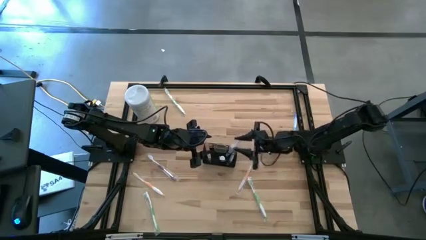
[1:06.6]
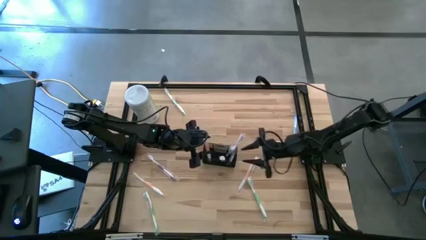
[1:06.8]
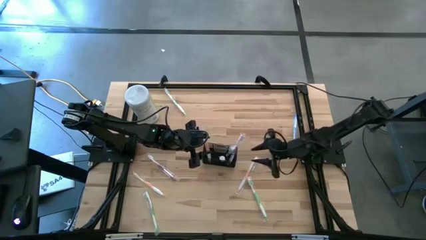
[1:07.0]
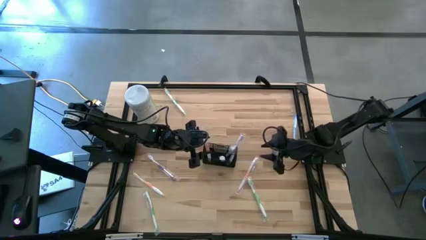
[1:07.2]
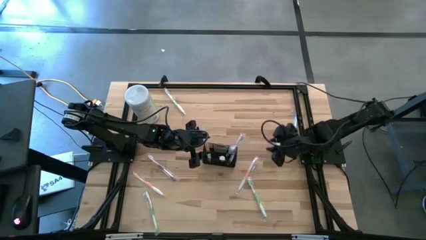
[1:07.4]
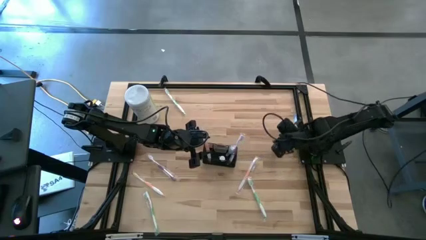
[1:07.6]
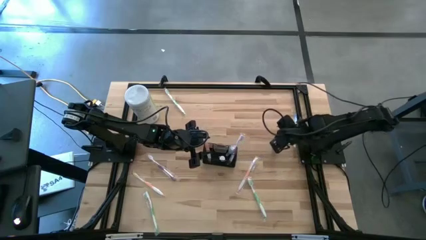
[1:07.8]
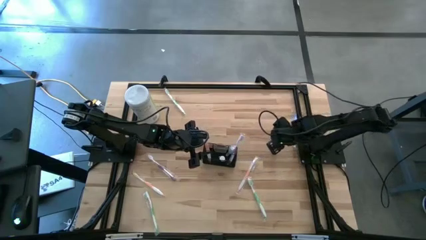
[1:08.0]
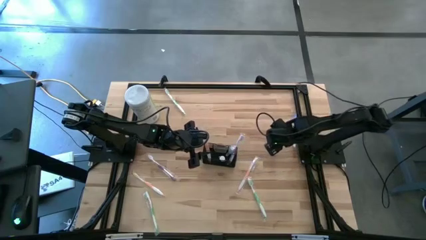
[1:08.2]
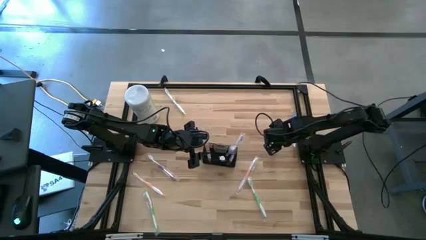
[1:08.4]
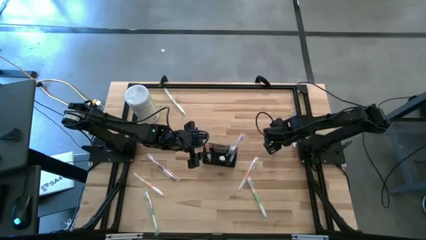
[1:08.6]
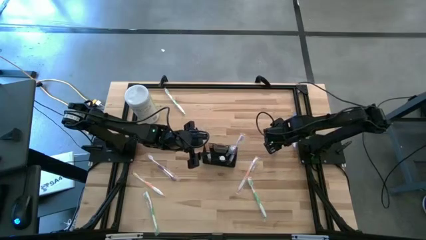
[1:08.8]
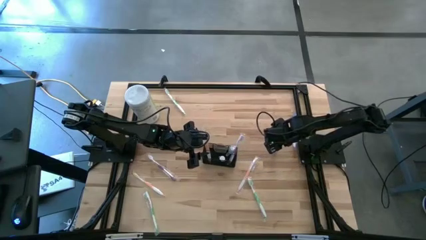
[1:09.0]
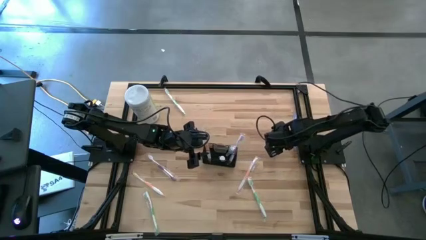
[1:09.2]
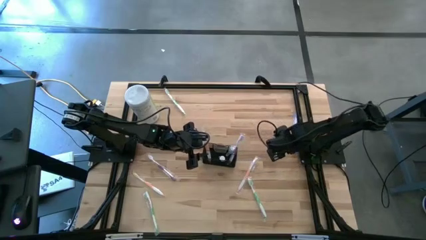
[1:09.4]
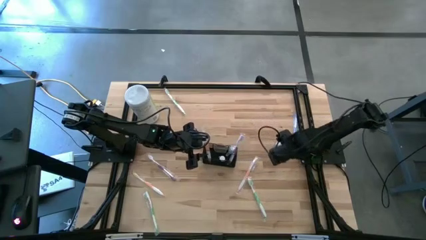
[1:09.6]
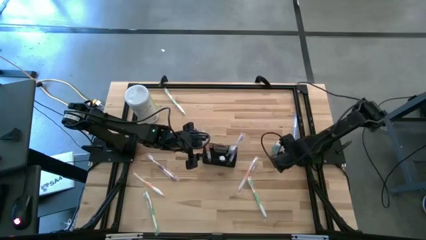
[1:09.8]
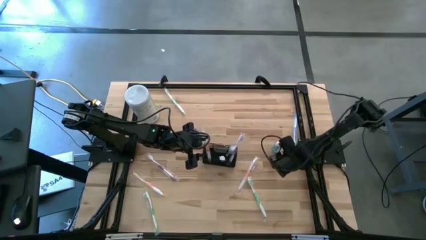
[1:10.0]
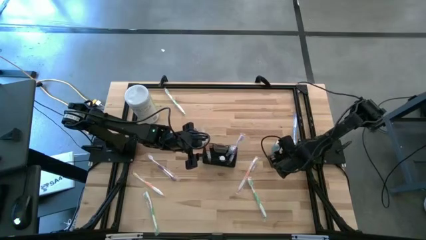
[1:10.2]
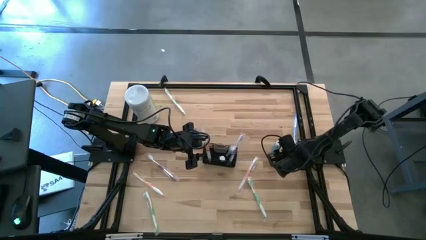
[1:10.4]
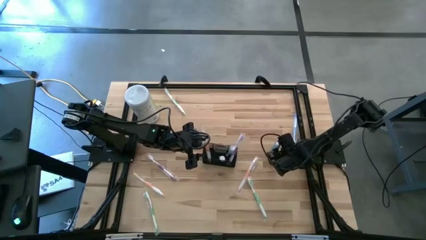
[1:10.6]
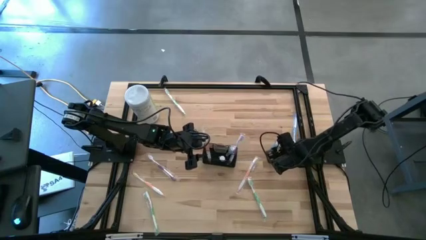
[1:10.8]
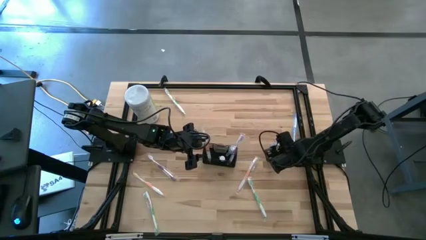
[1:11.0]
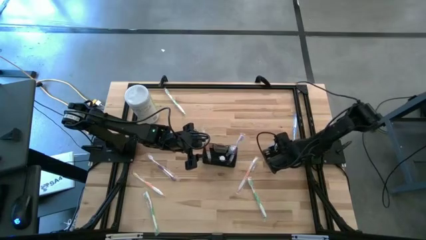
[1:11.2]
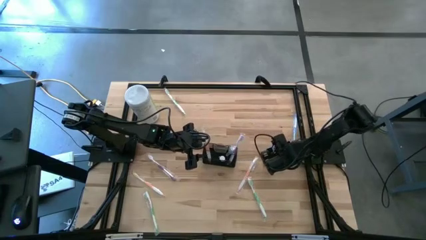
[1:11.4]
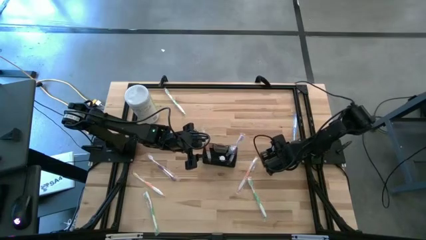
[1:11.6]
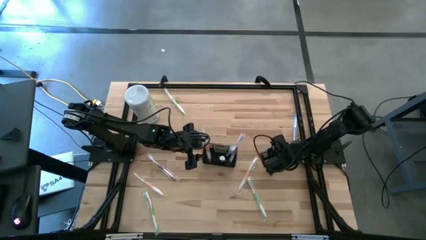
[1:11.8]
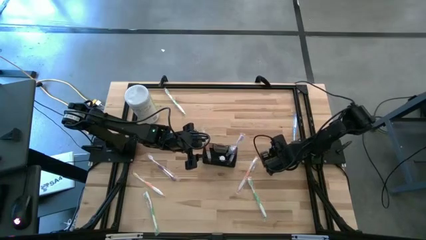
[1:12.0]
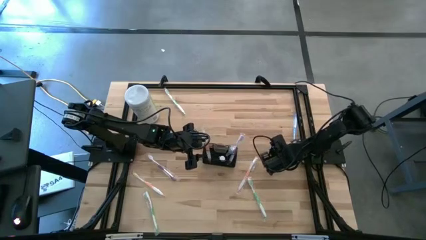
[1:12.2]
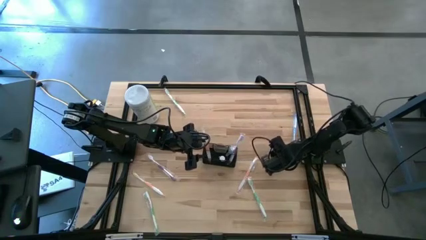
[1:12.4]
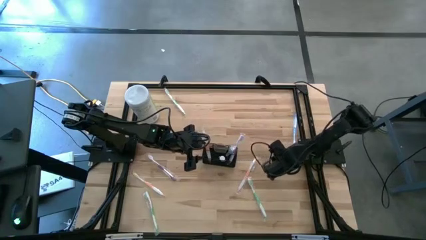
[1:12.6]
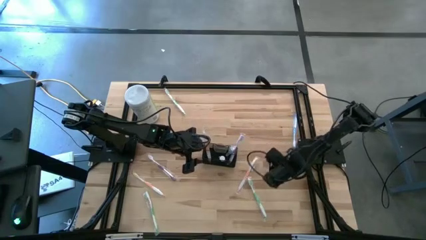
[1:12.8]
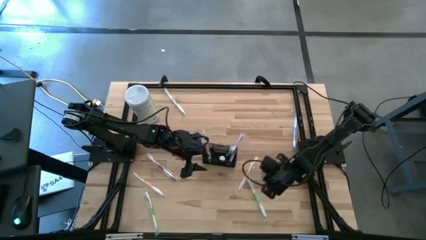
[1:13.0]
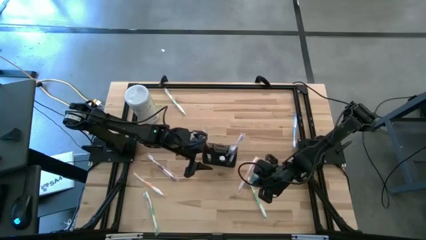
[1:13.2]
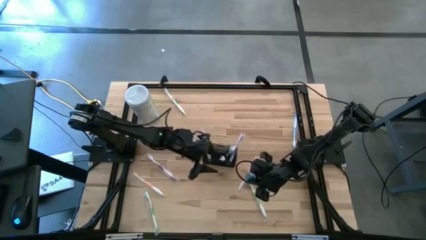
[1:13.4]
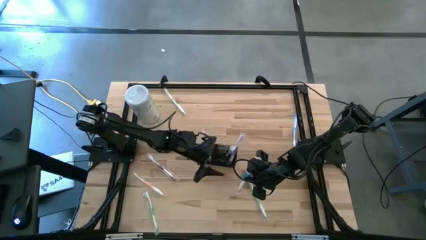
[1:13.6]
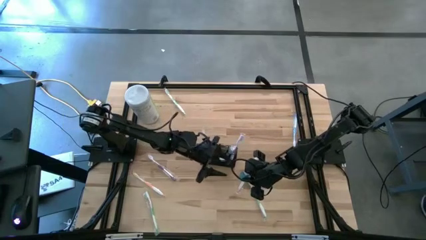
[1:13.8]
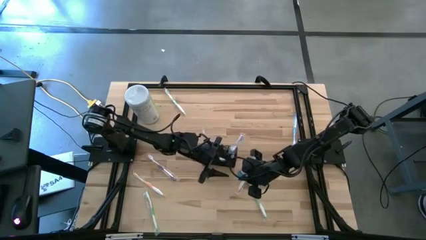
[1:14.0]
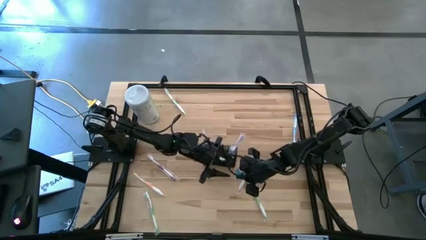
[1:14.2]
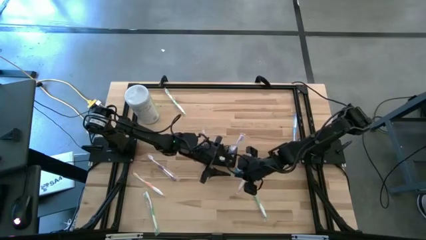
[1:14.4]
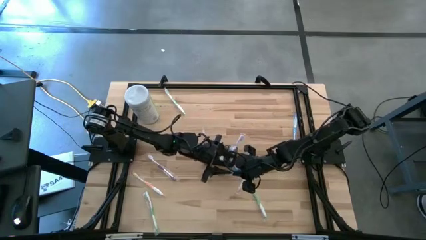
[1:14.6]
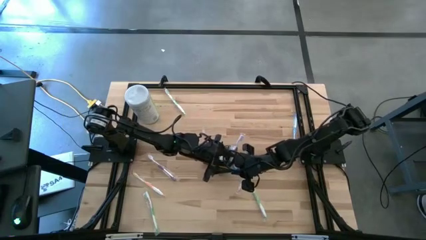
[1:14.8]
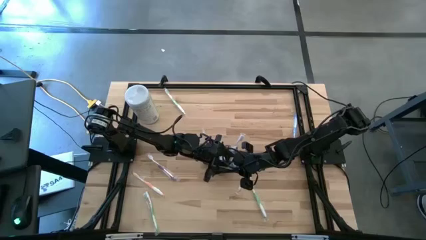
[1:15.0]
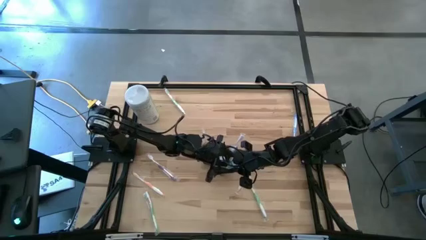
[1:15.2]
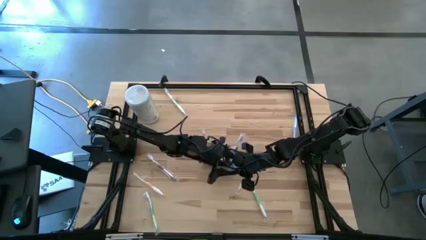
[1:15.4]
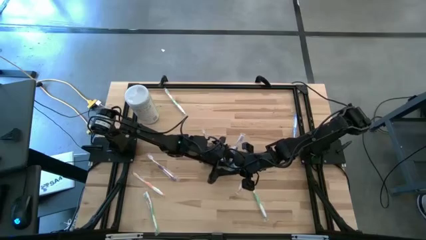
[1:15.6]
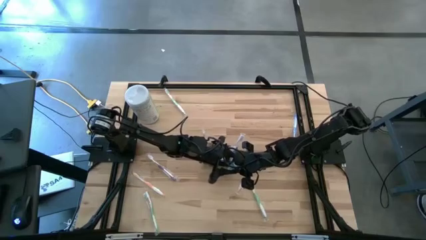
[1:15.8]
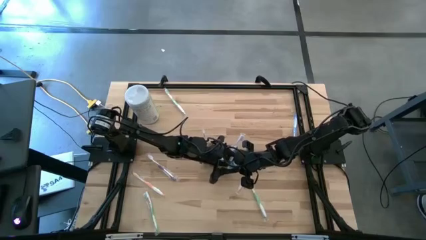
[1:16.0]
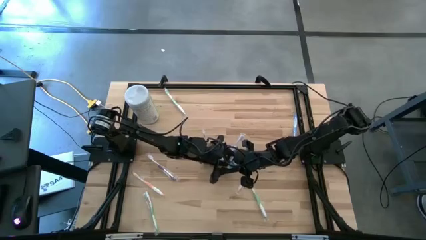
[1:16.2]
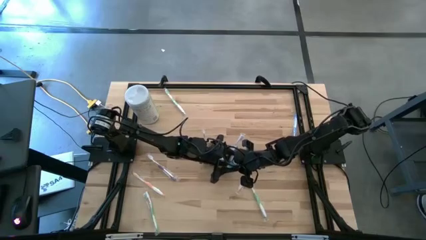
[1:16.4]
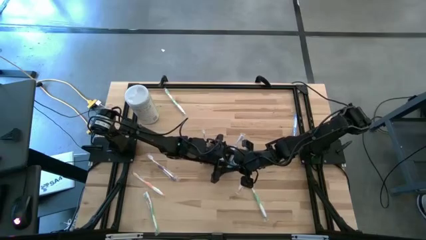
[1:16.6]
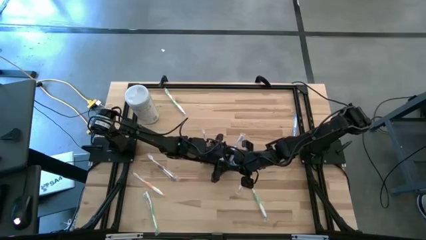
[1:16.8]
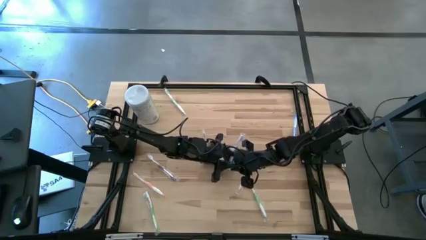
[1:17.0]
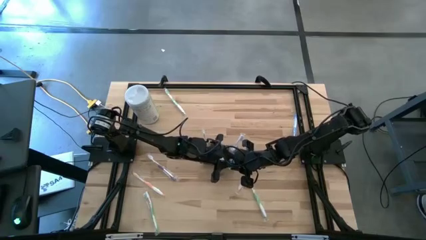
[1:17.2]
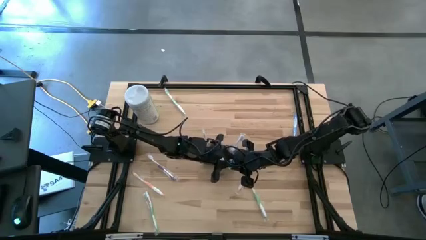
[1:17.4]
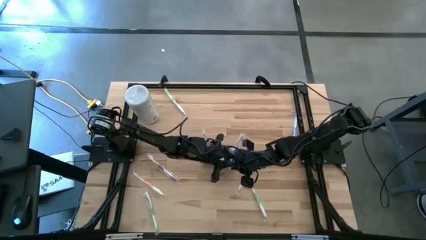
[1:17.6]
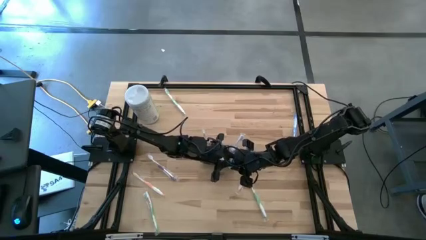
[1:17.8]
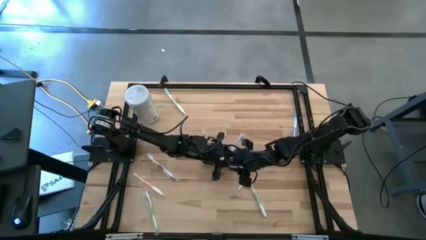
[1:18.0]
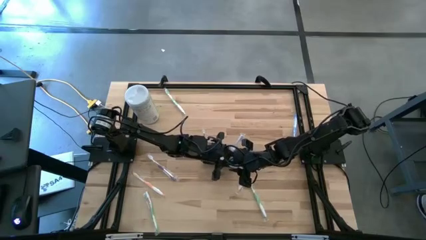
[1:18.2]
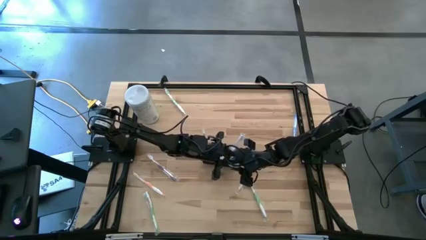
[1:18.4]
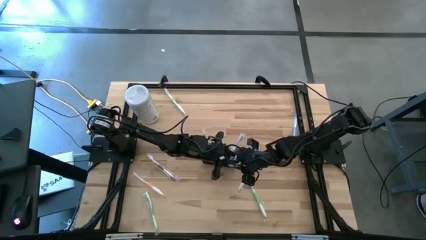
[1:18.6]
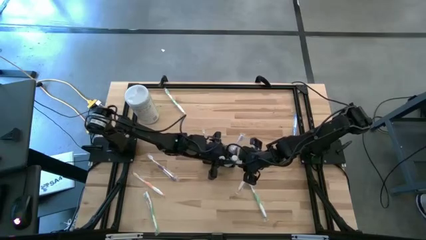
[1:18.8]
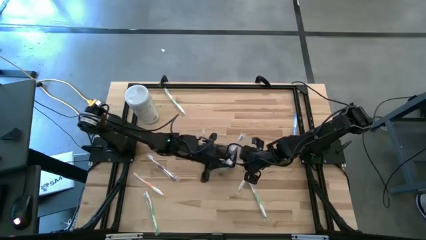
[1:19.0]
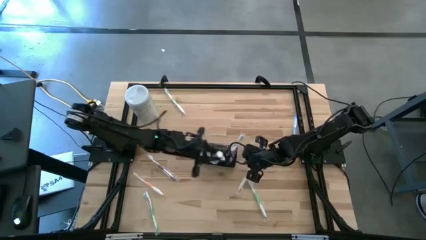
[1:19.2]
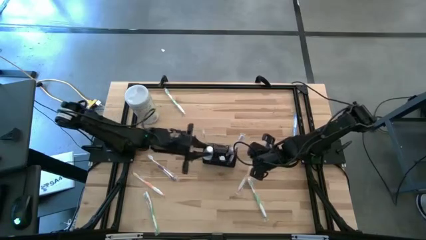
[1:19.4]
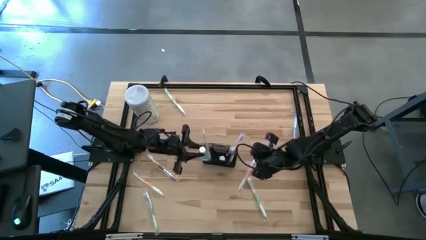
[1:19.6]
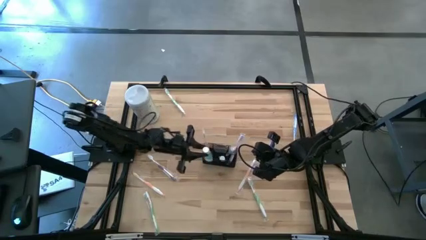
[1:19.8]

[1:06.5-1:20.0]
Task: Pick & Place toothbrushing station
Put the blue mouthwash bottle into the mesh organizer
